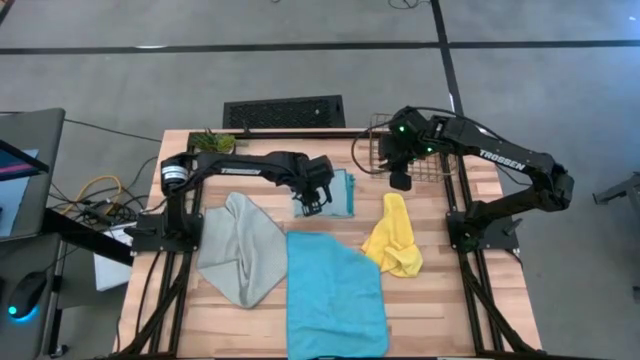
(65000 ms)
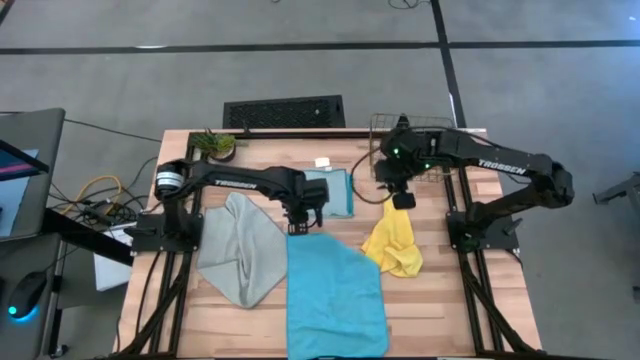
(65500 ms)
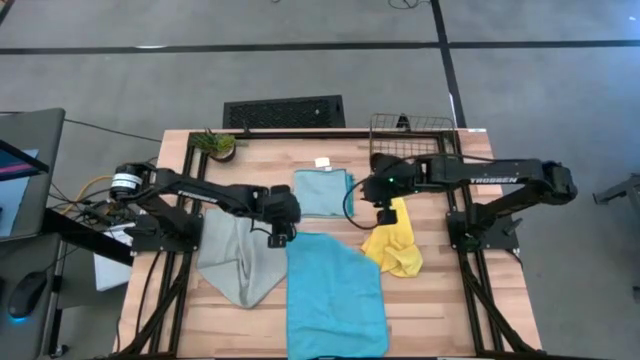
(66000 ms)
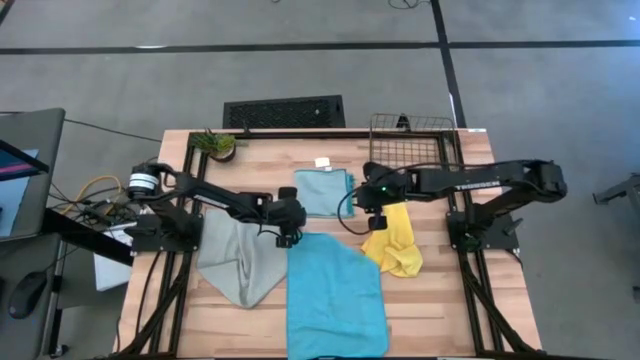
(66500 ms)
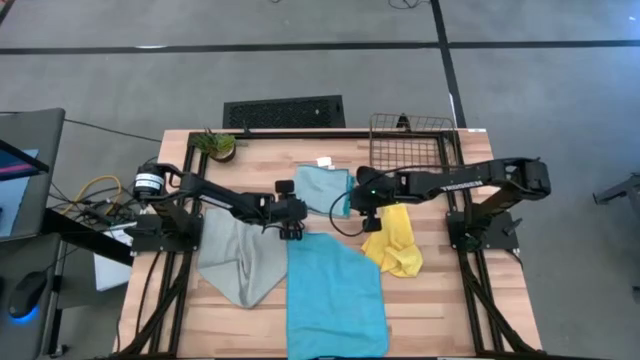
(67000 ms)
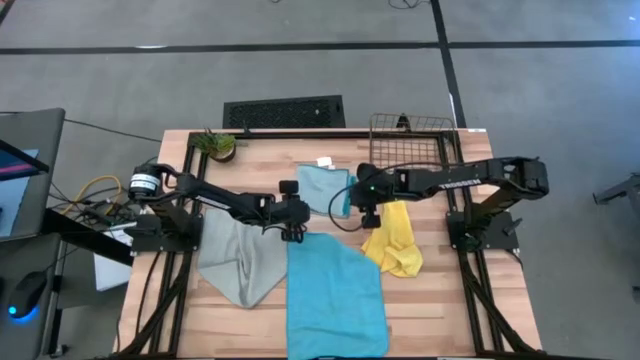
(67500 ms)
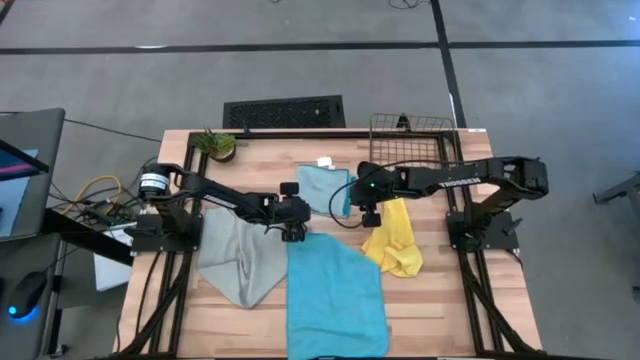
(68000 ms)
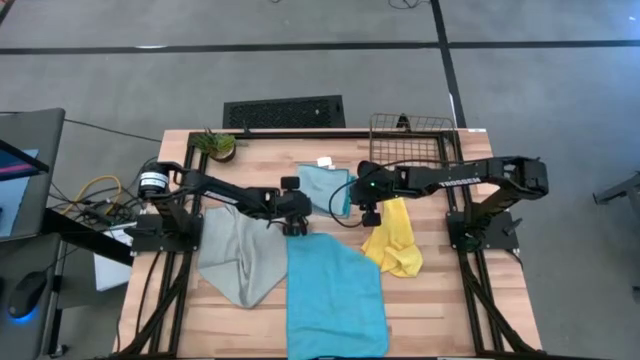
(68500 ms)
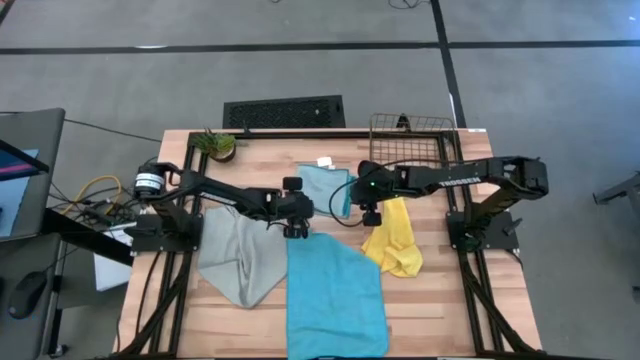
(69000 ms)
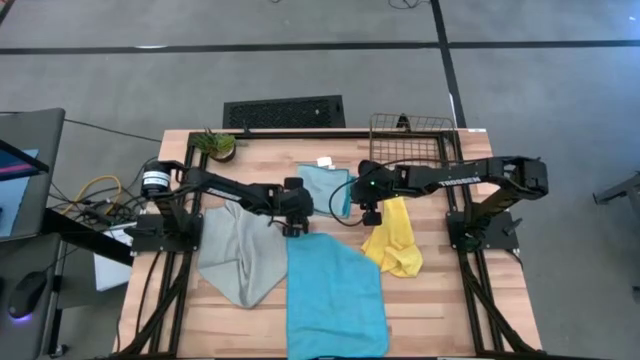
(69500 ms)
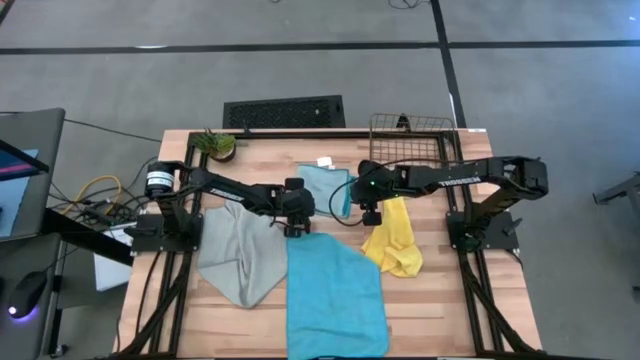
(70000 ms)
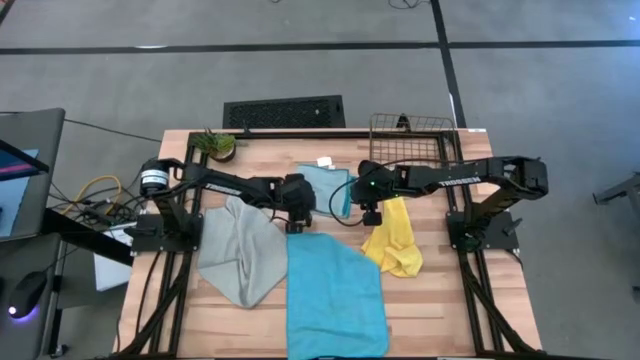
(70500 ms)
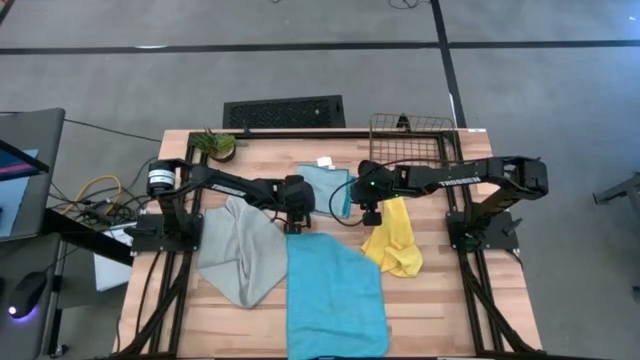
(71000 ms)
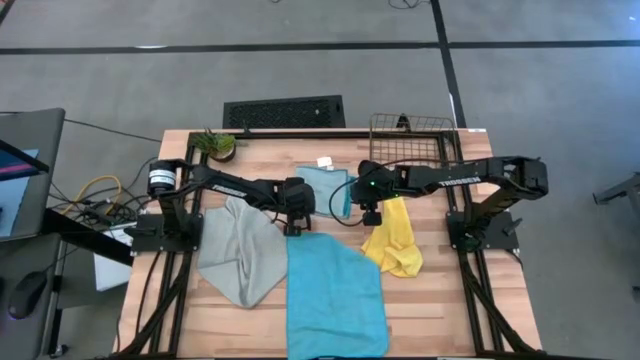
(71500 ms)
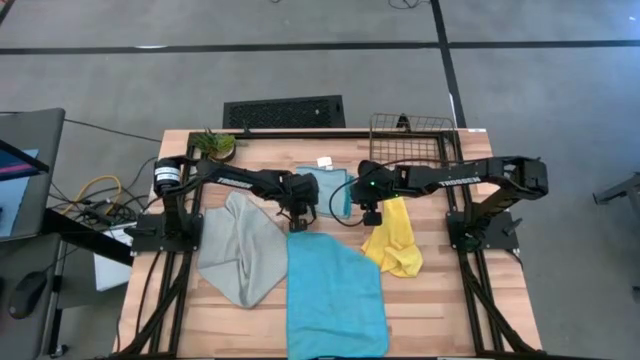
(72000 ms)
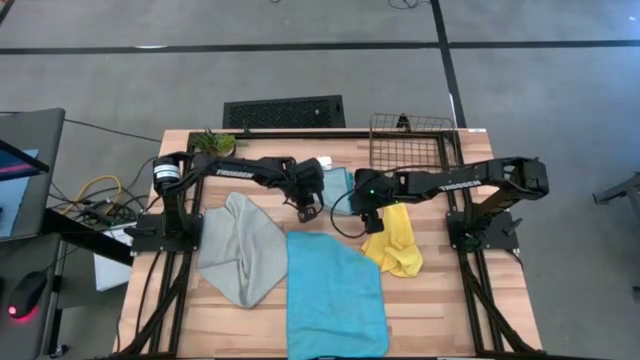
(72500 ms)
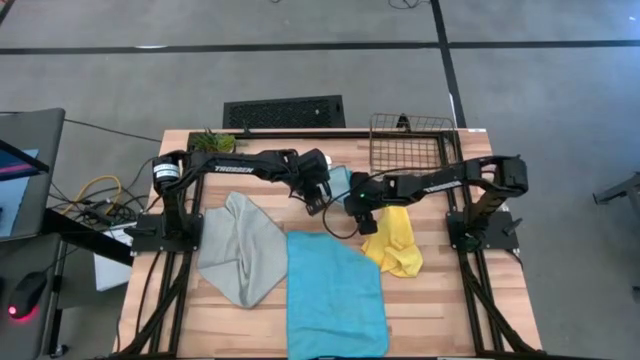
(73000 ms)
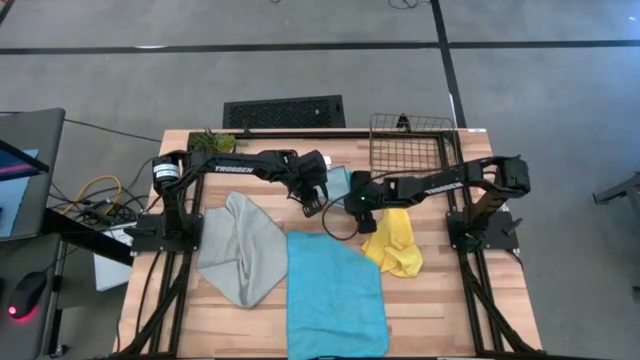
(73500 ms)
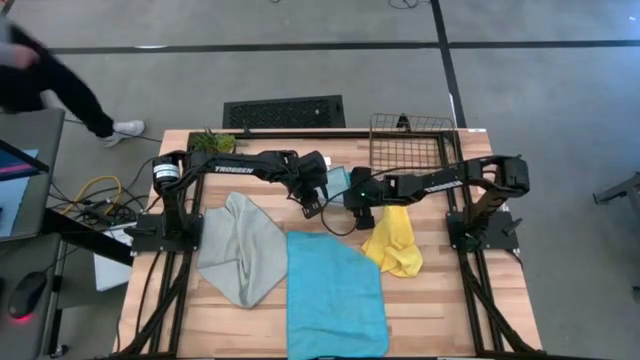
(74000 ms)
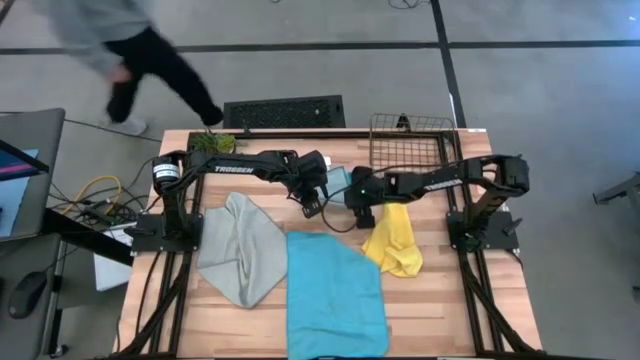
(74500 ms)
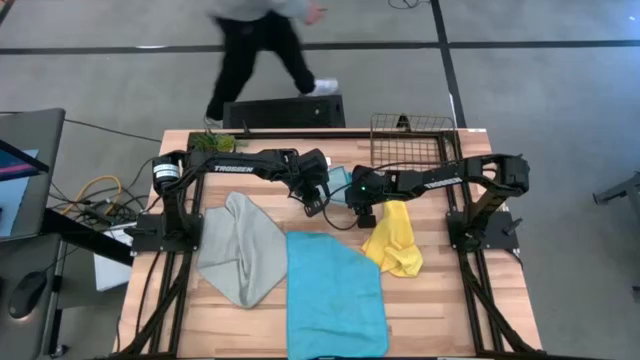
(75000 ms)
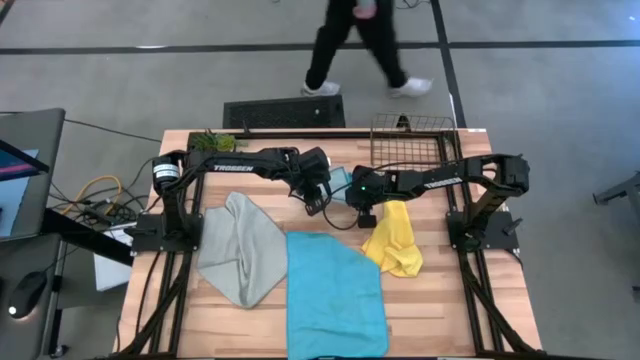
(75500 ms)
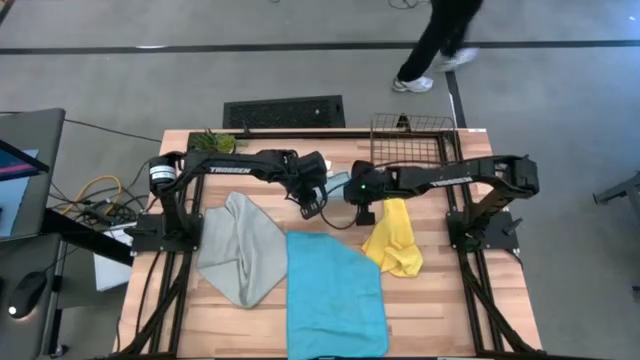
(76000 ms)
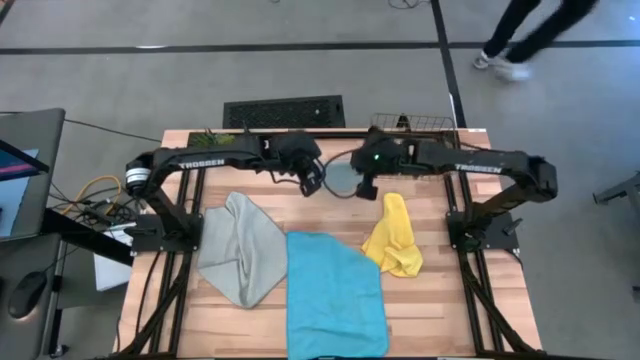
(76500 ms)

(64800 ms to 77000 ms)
Task: Fold microfiber towels
Put the folded light blue microfiber cloth into the wire basket

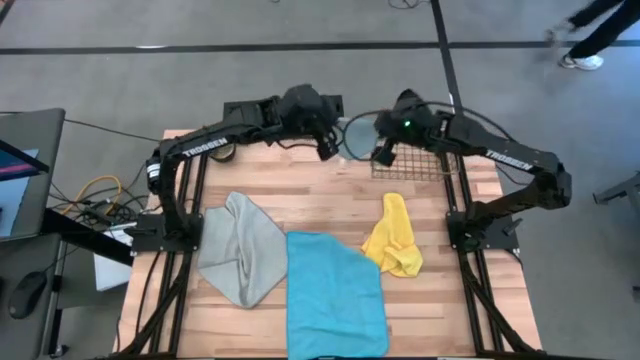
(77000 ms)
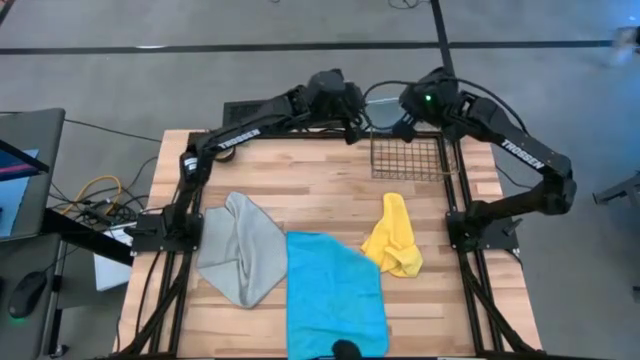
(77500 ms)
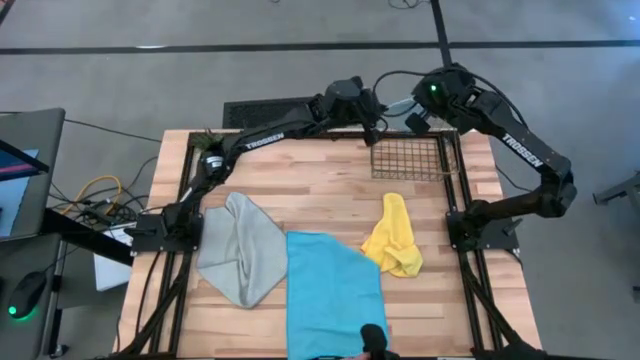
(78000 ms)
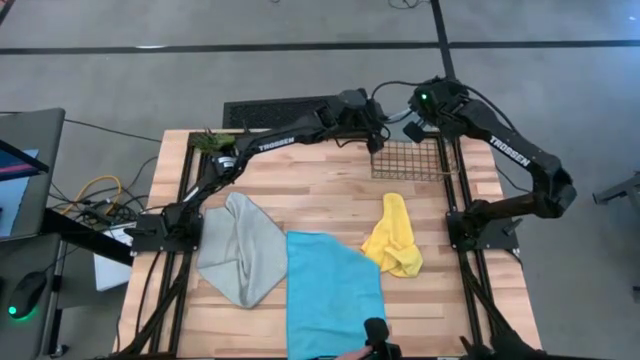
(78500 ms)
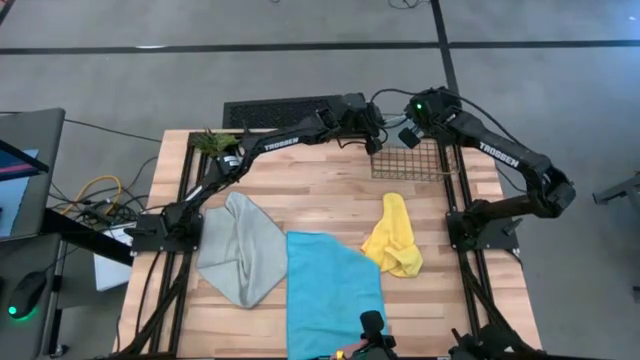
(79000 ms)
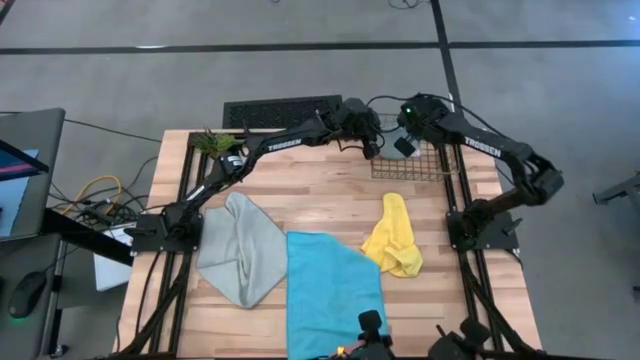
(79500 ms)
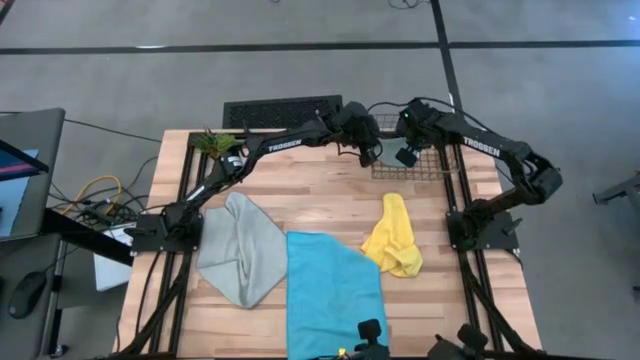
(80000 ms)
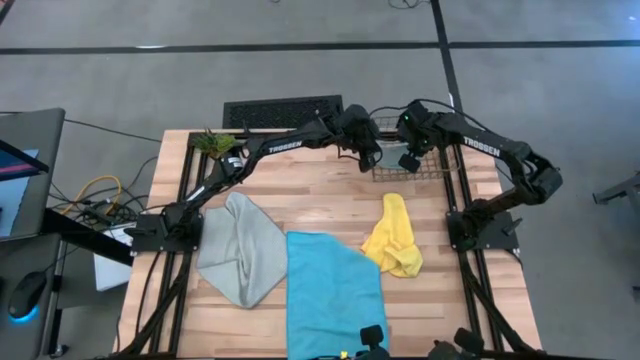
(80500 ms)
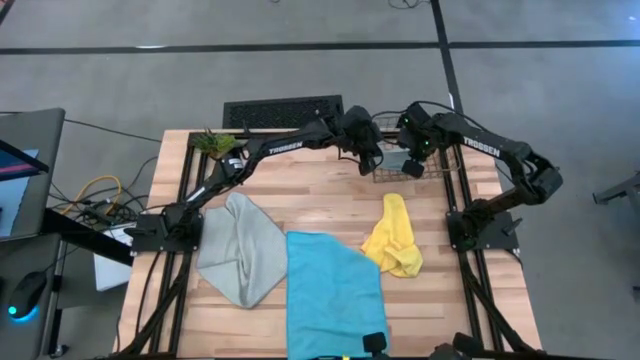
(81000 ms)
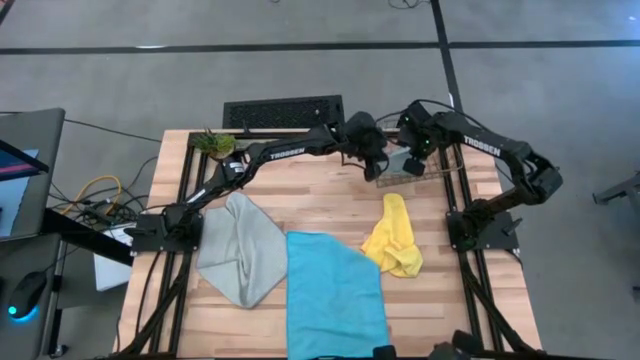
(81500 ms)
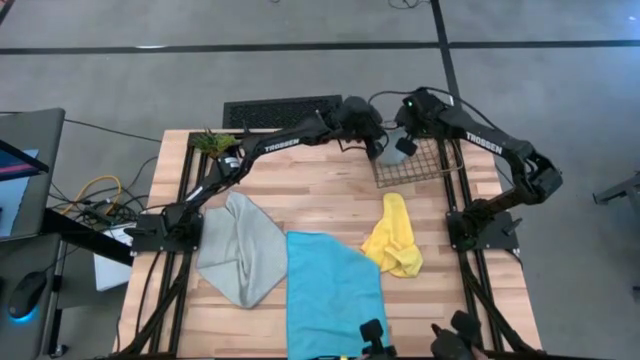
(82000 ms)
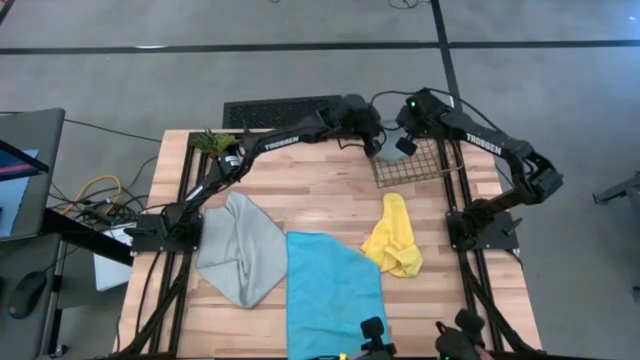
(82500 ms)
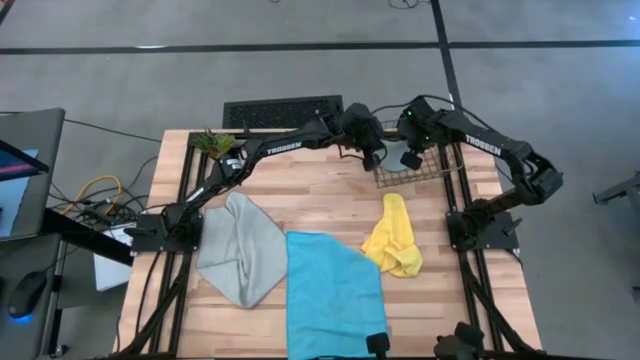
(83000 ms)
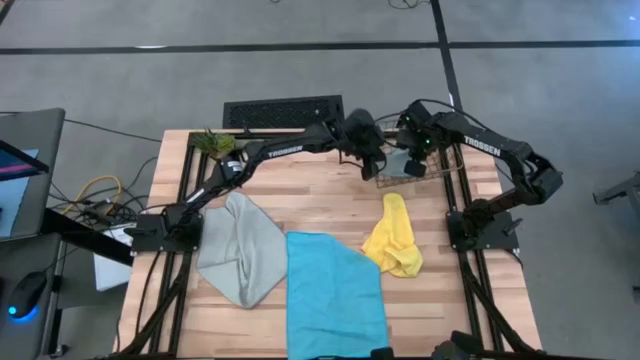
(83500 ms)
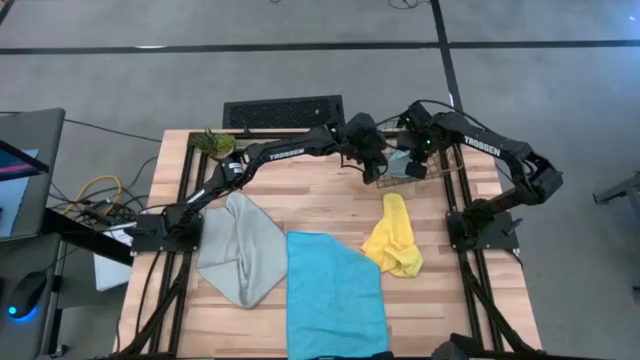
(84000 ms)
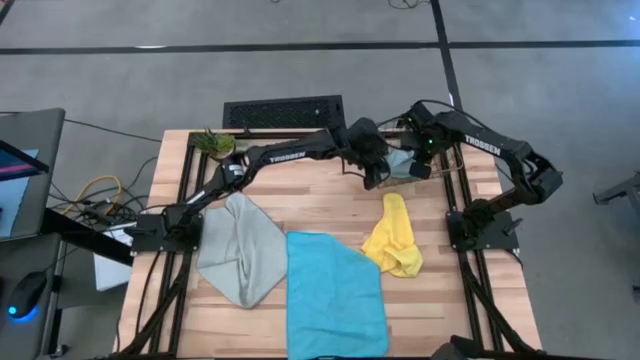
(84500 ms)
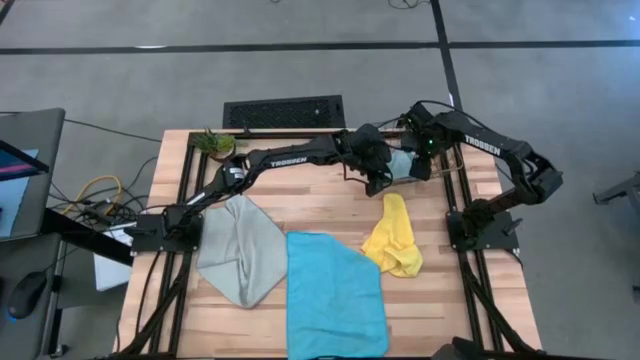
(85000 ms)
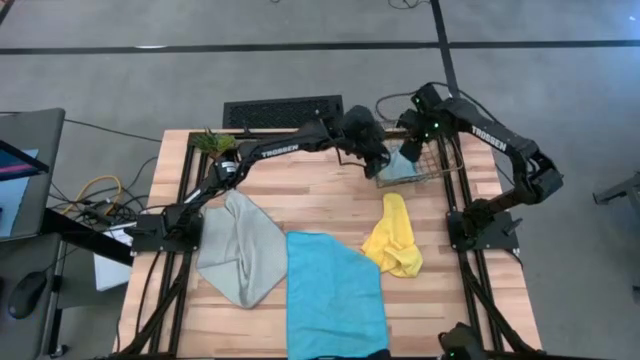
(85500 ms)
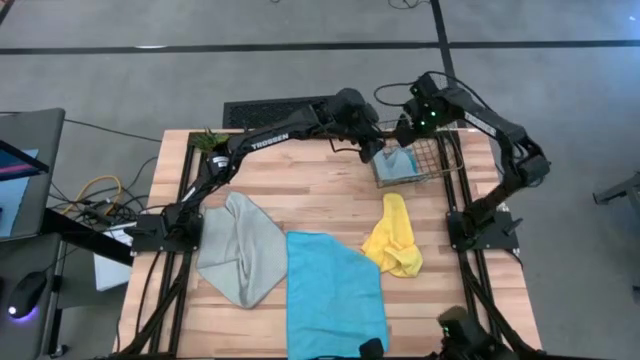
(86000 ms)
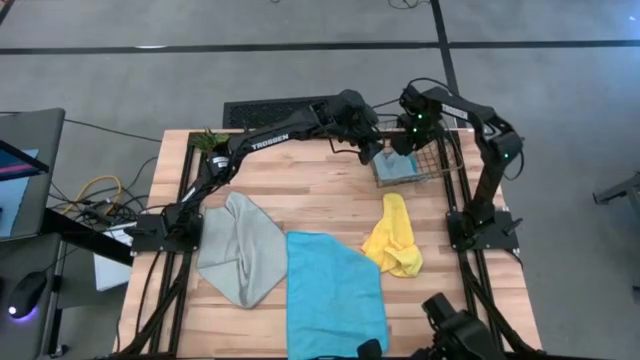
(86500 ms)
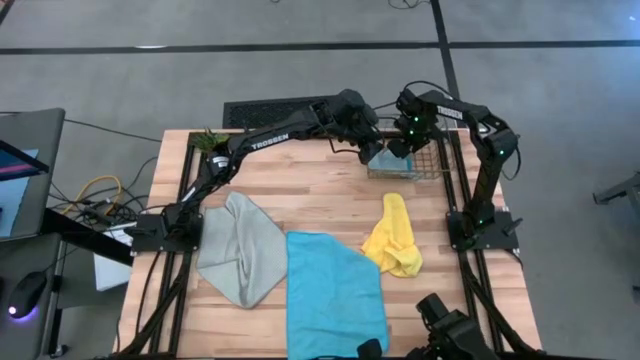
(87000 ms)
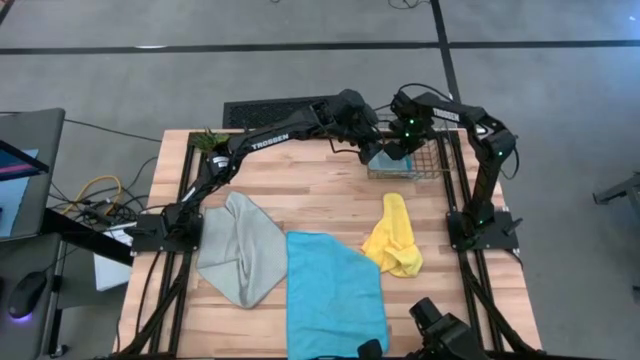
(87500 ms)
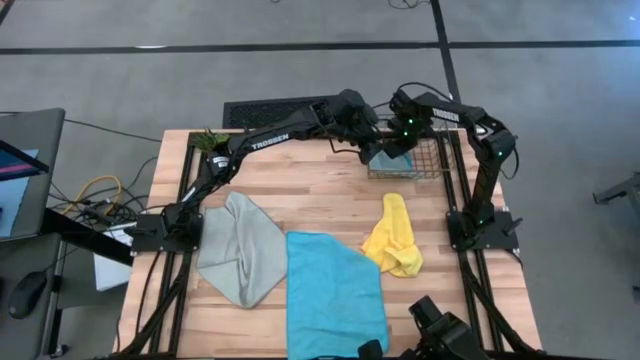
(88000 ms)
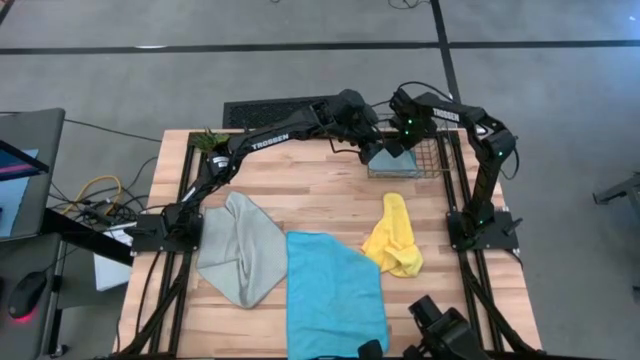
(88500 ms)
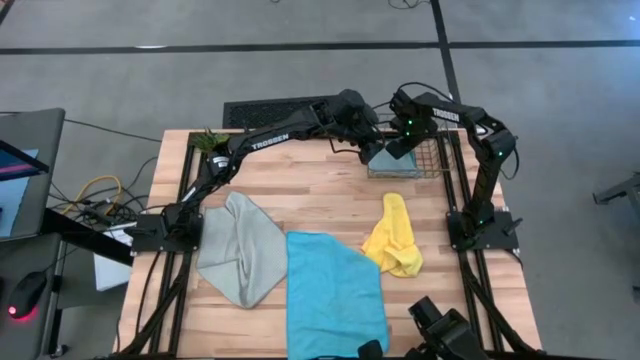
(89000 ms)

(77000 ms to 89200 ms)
Put the folded light blue microfiber cloth into the wire basket
